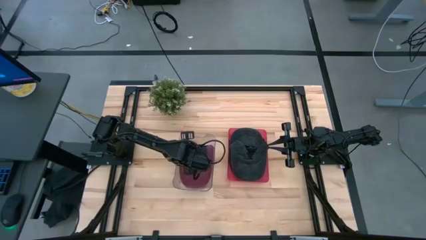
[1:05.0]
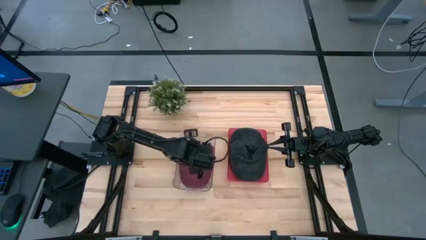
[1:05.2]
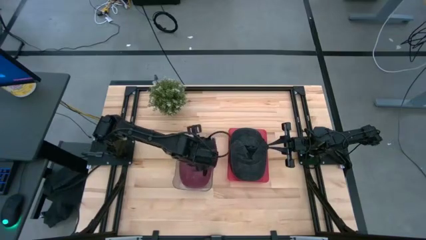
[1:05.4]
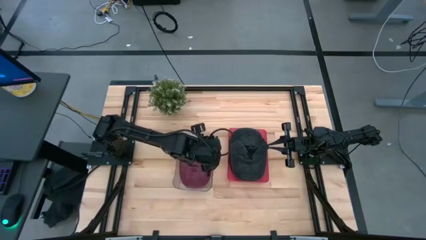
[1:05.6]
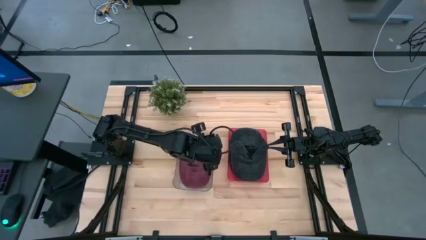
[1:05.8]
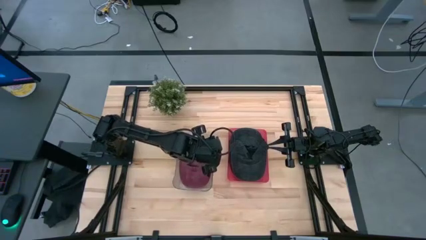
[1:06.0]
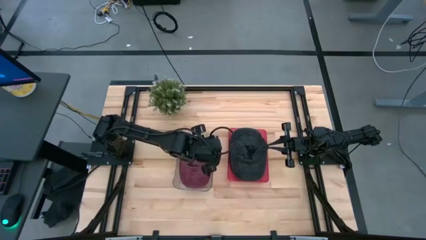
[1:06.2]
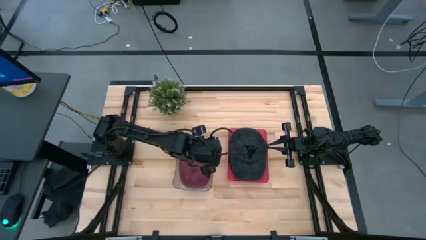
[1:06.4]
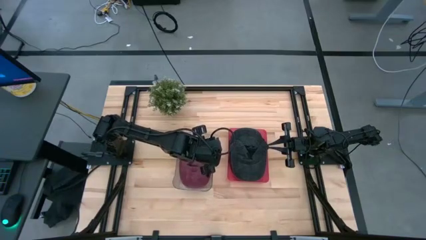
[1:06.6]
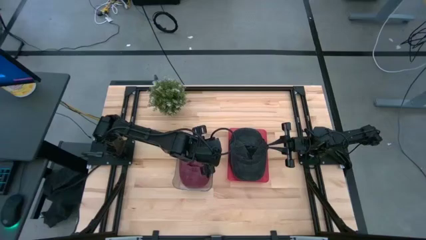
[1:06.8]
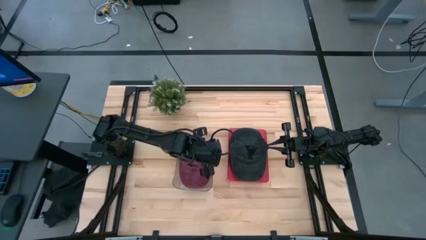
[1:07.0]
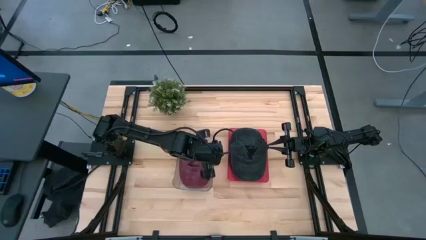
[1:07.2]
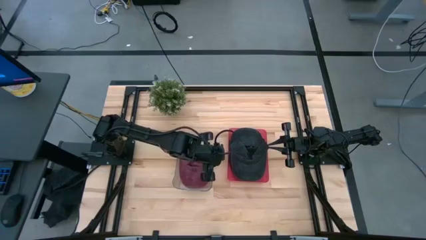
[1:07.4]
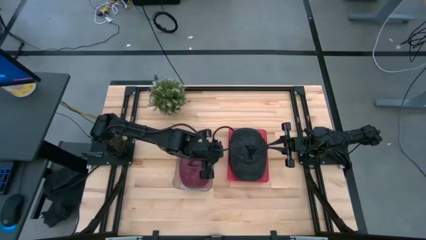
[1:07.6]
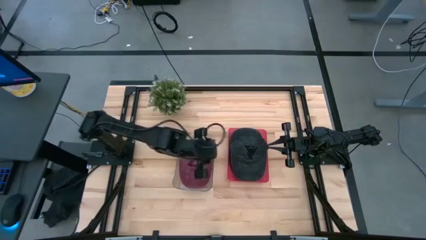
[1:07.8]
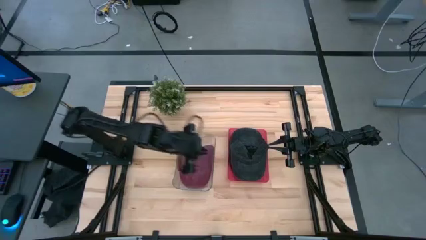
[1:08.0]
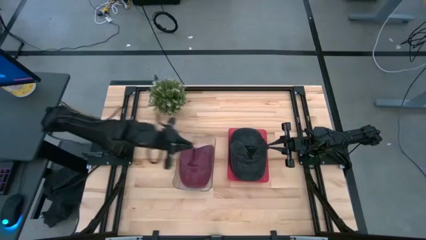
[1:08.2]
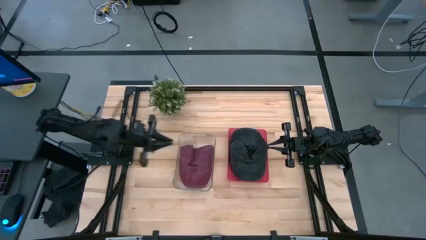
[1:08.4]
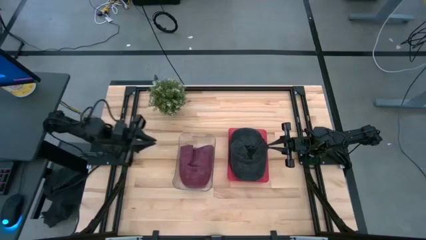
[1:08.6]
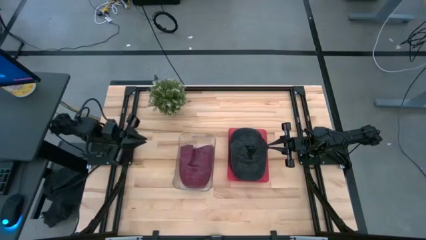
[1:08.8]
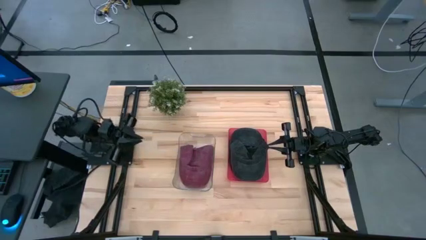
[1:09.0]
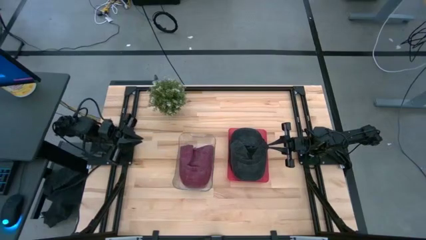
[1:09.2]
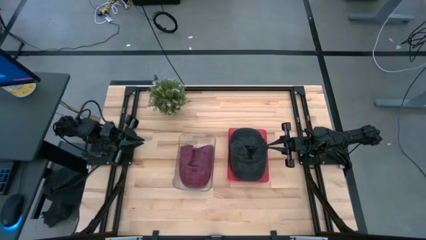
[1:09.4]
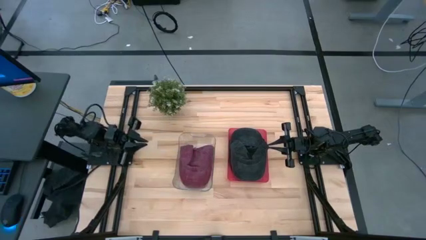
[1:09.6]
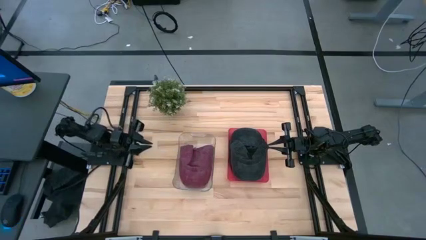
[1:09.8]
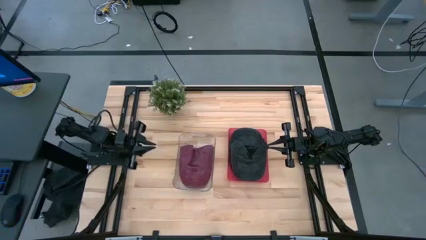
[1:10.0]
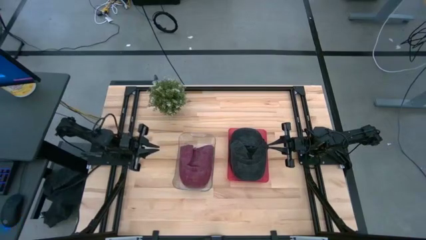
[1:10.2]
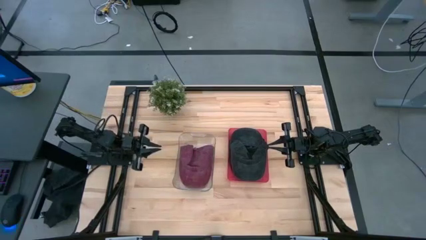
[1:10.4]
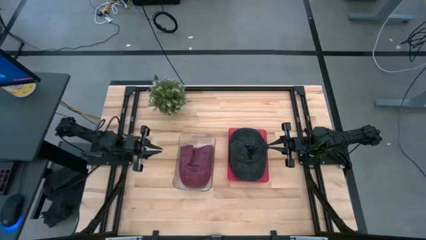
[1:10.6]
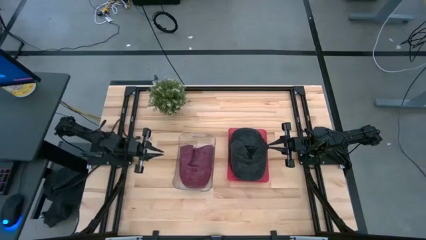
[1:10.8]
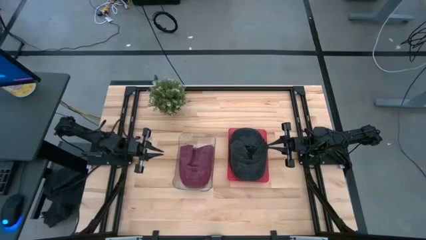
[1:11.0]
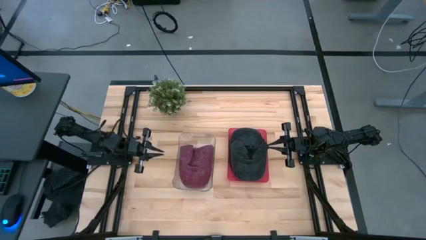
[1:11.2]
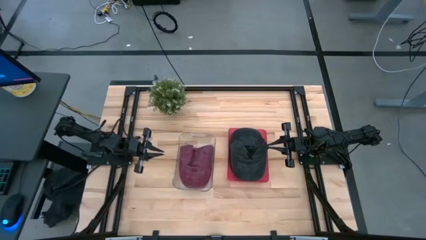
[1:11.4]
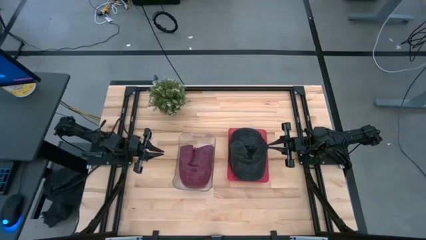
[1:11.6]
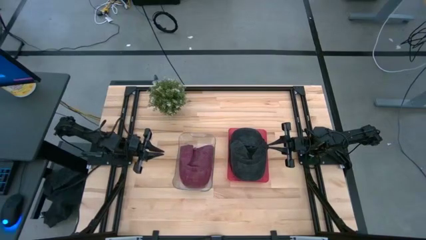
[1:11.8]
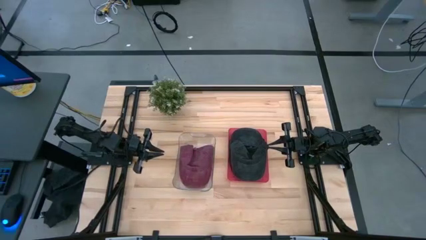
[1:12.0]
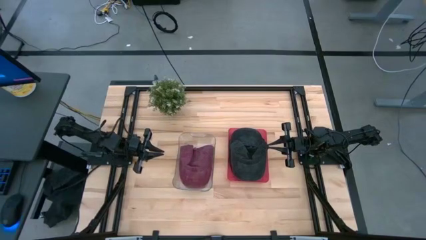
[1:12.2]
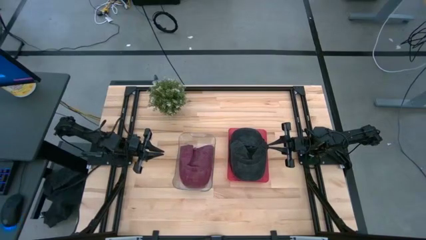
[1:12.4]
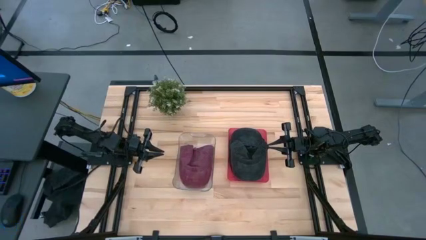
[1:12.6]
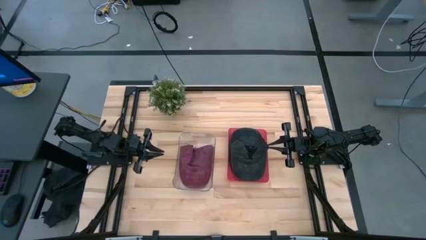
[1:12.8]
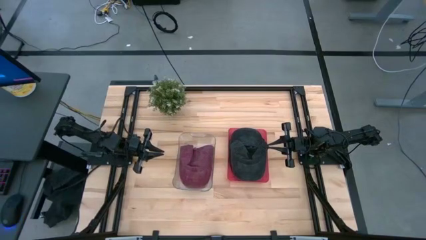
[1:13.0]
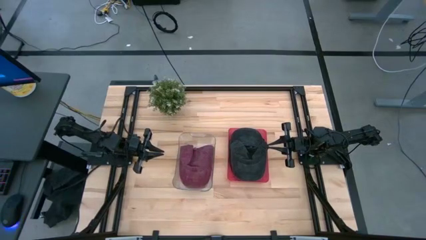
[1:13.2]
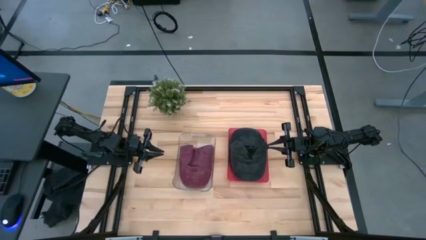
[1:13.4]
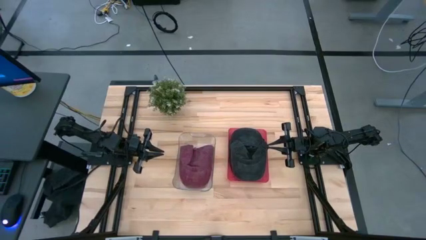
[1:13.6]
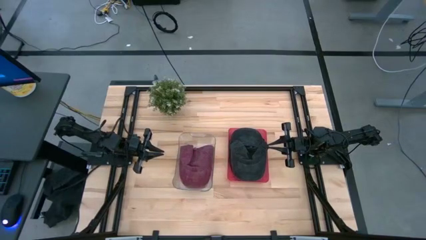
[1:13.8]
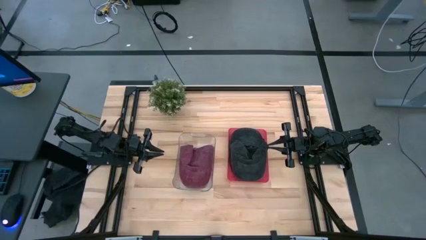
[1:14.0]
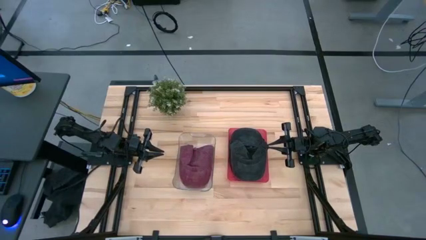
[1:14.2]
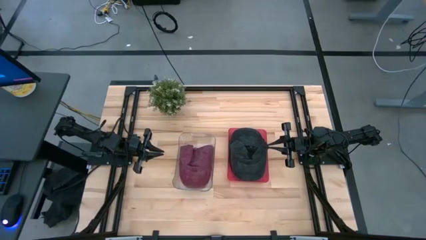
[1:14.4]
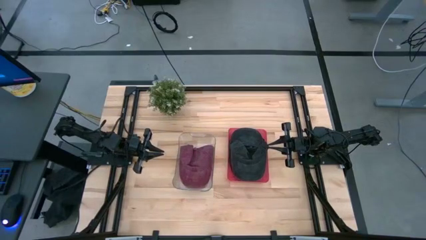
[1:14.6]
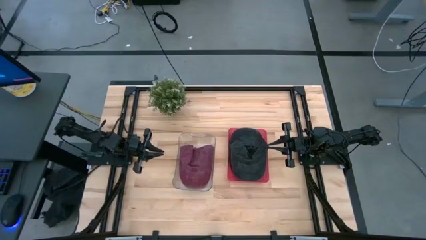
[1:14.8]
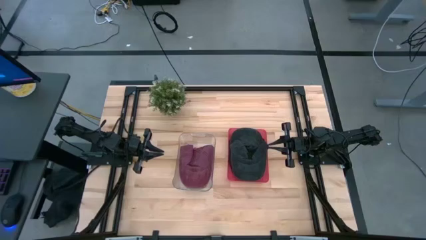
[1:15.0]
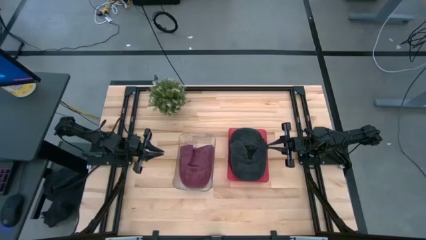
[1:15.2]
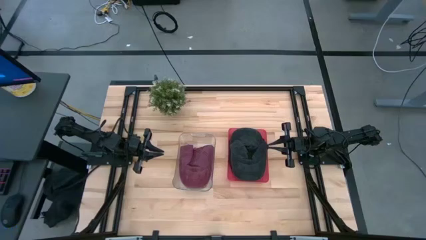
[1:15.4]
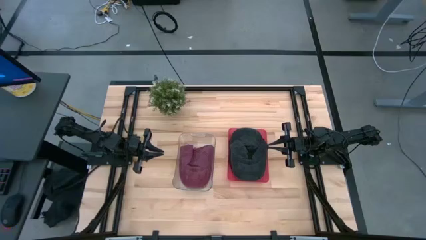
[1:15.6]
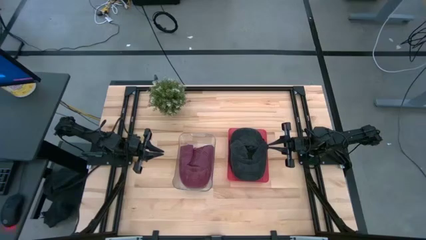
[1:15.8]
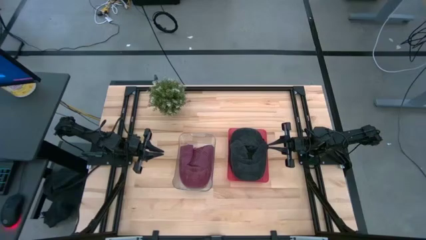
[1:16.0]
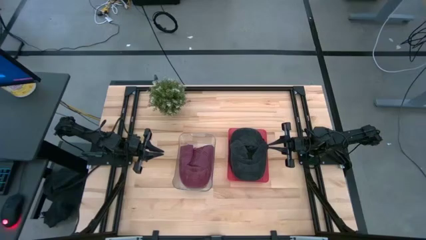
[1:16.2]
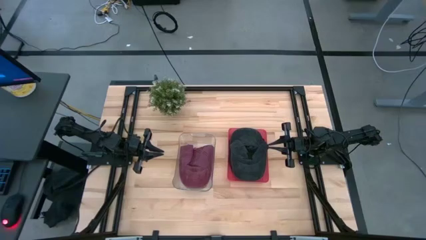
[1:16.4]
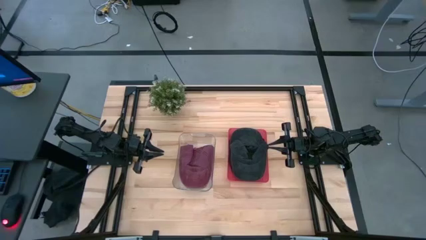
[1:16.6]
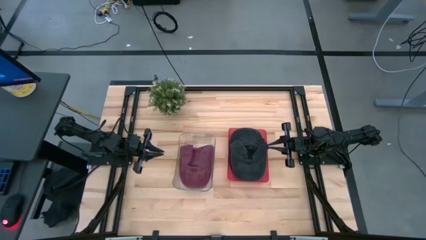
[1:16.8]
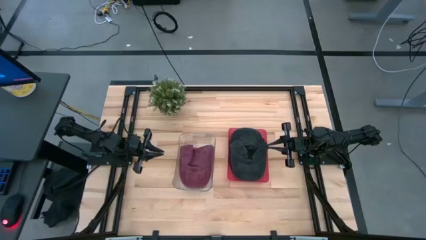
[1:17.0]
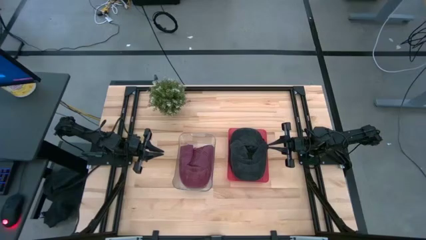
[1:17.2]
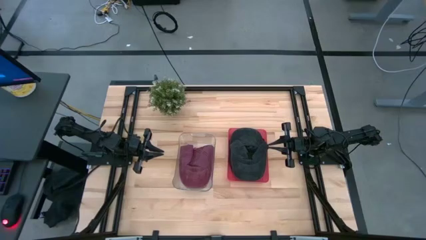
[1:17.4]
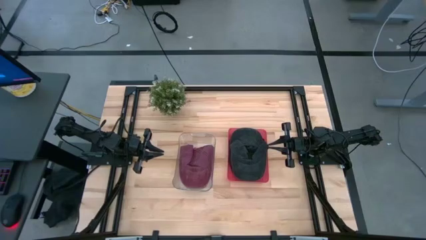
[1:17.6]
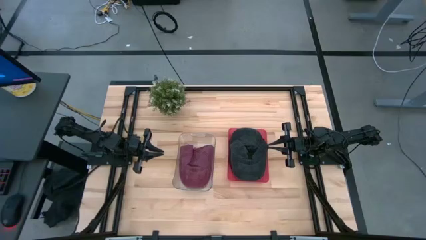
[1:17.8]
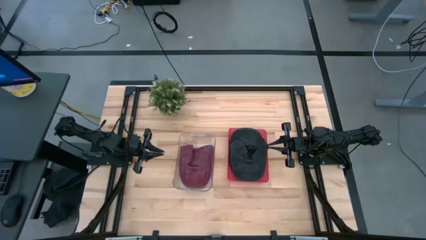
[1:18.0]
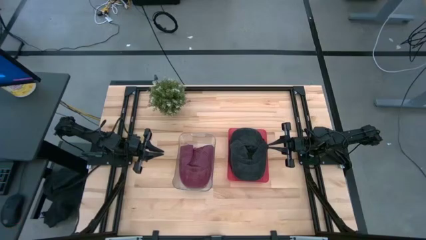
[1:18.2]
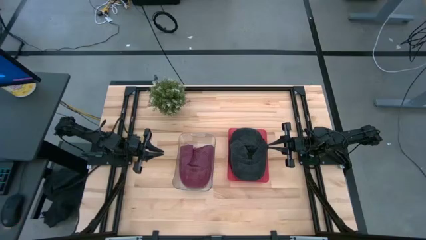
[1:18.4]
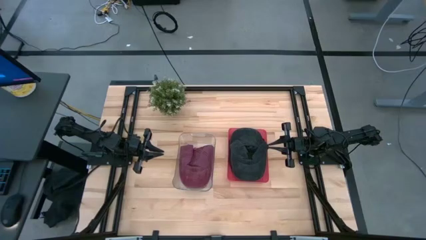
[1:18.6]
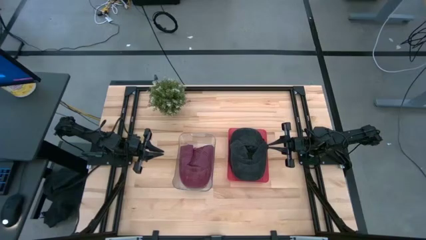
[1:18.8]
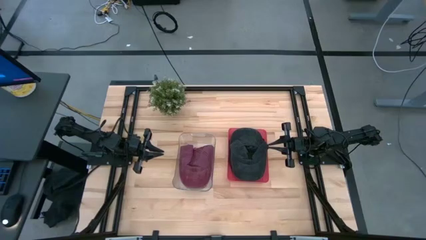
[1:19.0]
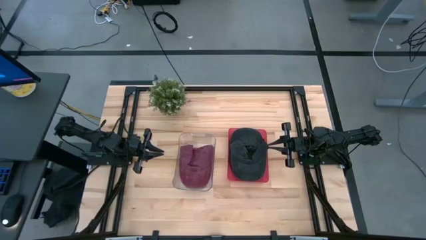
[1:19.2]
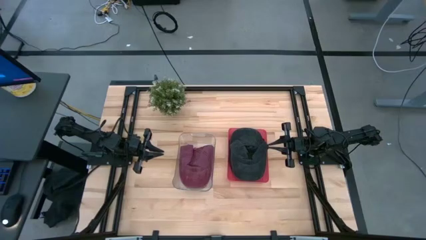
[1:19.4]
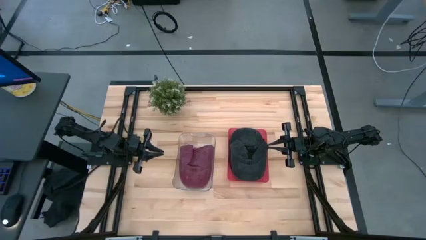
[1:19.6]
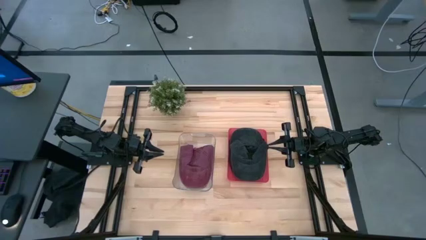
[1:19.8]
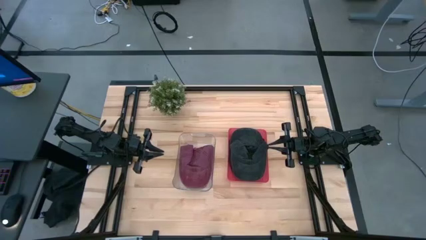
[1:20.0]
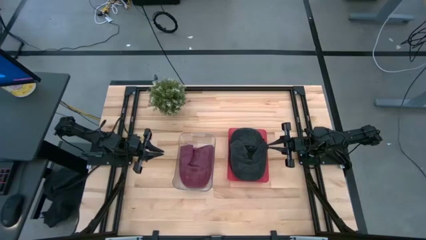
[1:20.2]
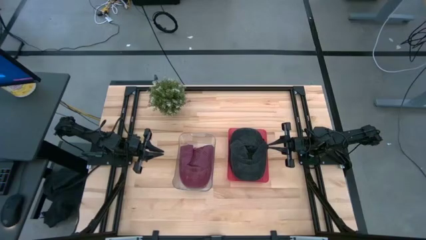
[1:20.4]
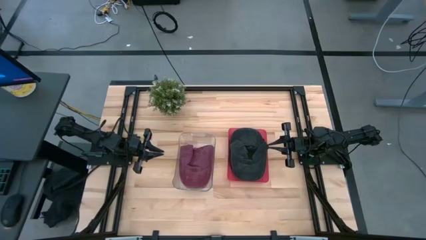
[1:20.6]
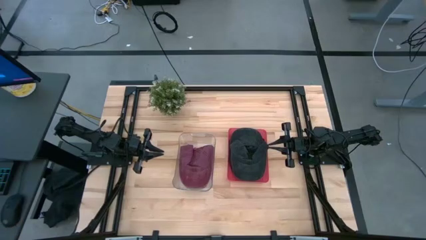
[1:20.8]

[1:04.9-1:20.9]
Task: Pick & Place hat
Return to Home Position
